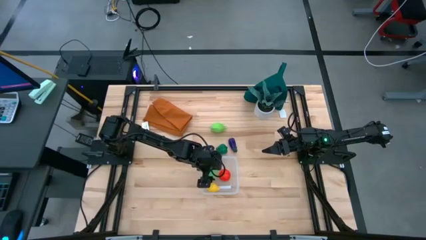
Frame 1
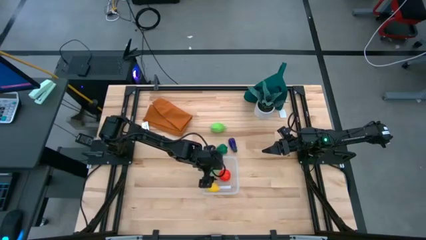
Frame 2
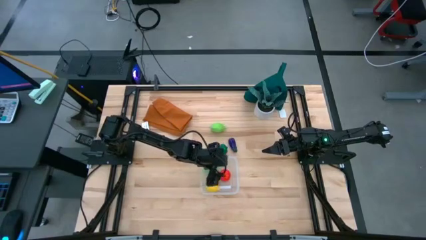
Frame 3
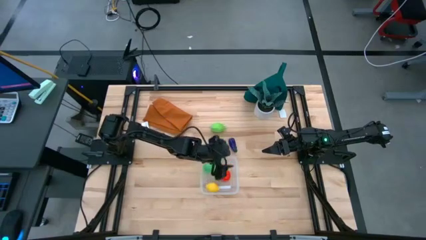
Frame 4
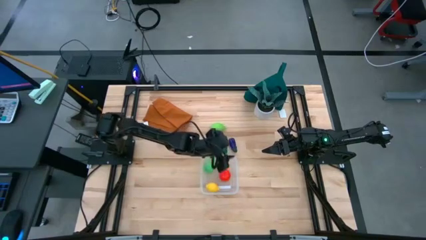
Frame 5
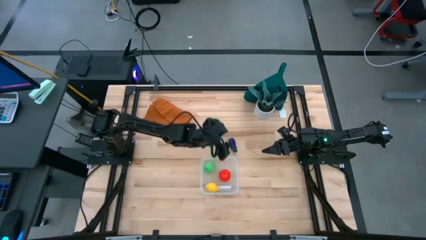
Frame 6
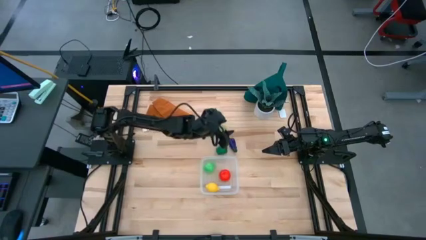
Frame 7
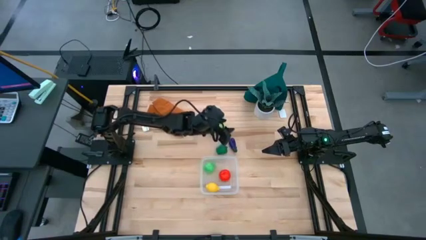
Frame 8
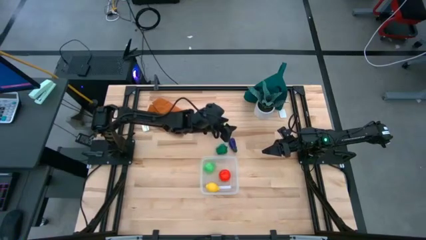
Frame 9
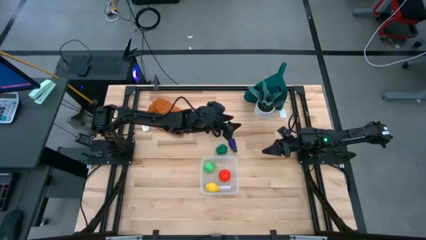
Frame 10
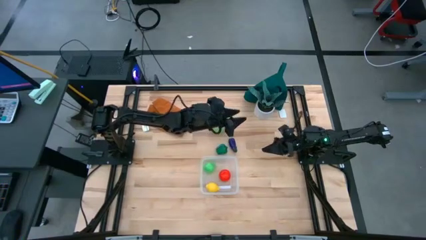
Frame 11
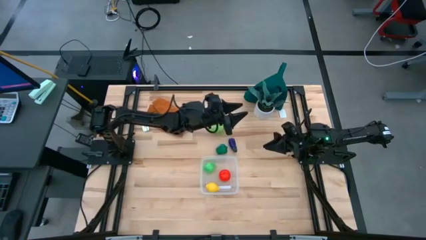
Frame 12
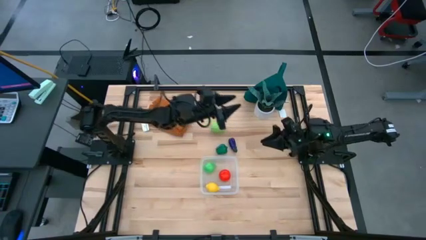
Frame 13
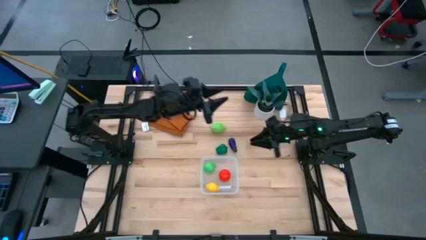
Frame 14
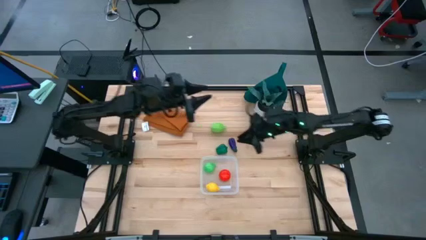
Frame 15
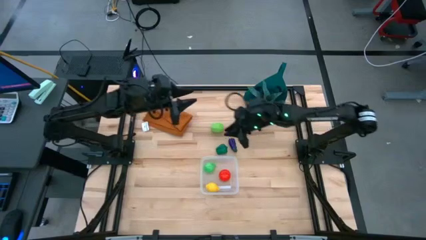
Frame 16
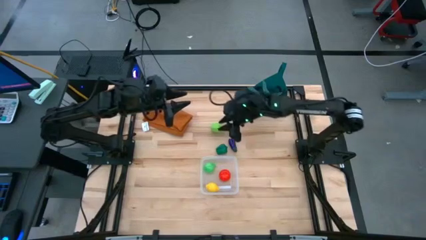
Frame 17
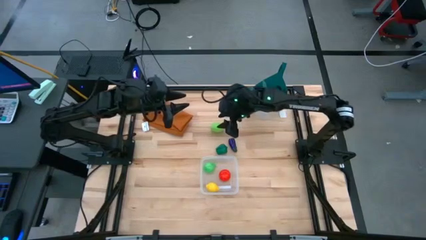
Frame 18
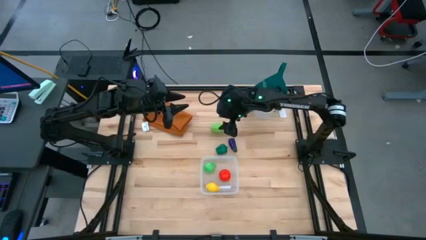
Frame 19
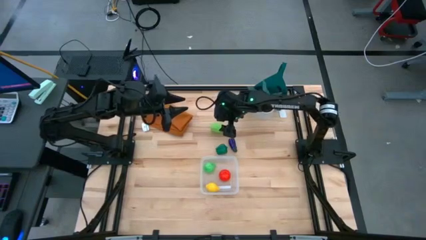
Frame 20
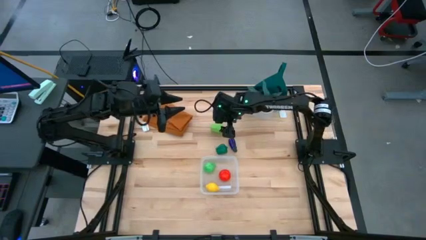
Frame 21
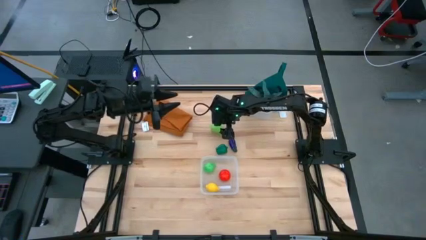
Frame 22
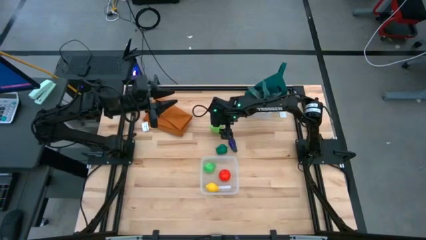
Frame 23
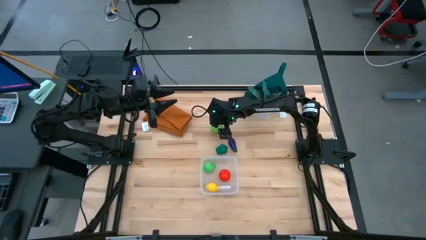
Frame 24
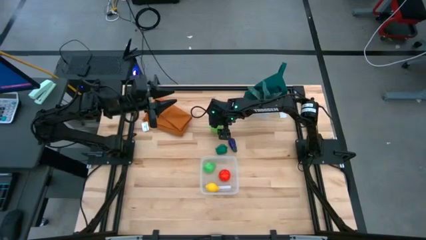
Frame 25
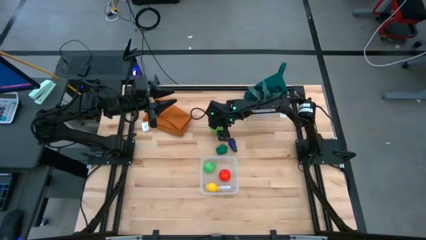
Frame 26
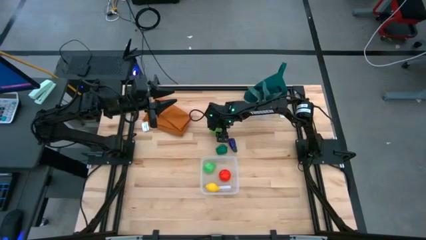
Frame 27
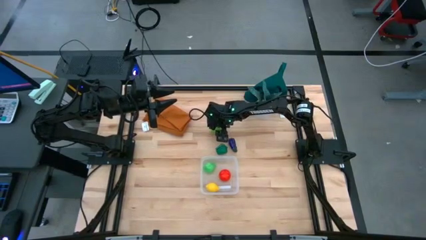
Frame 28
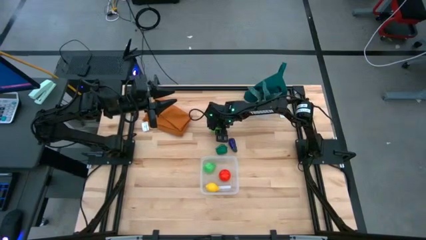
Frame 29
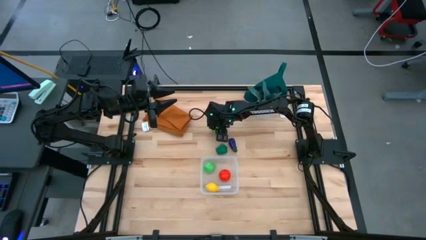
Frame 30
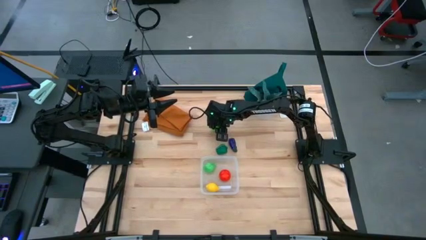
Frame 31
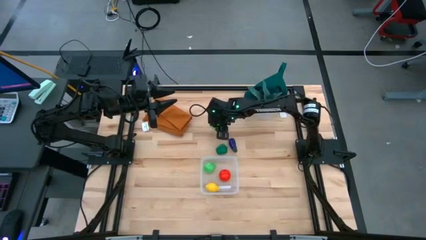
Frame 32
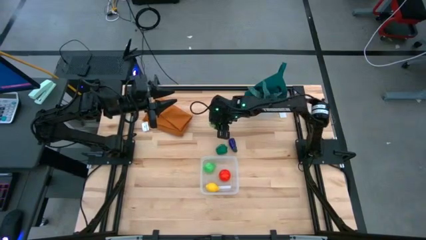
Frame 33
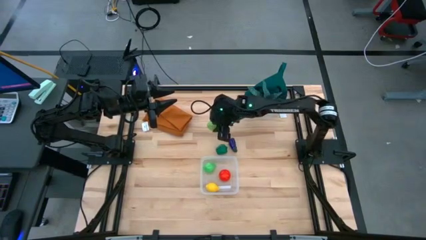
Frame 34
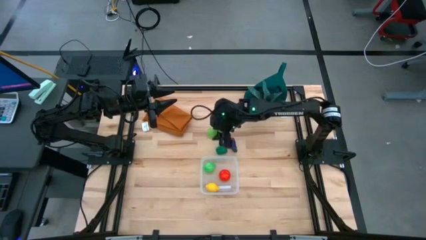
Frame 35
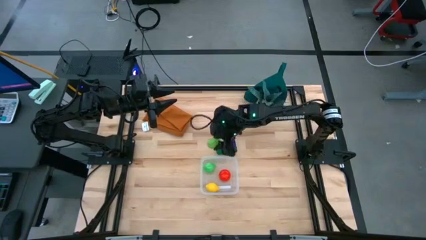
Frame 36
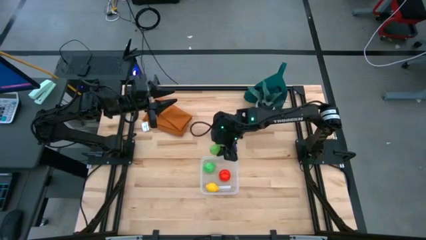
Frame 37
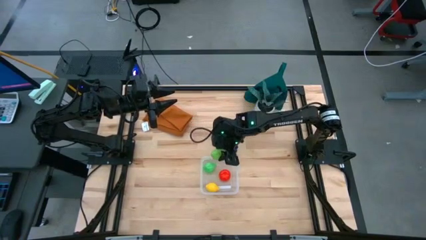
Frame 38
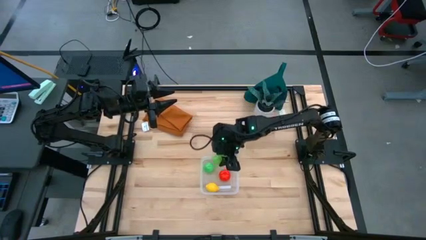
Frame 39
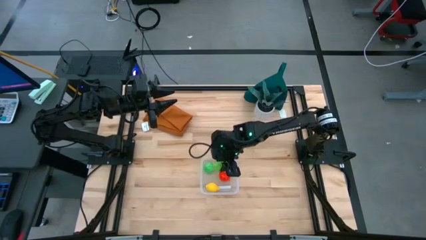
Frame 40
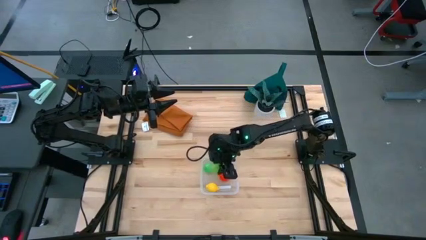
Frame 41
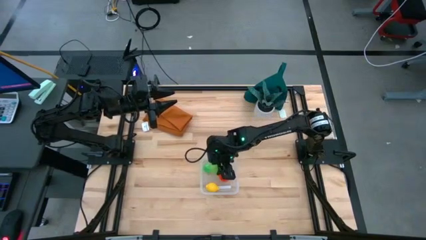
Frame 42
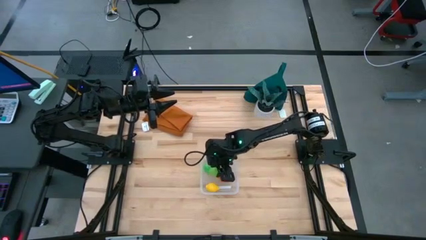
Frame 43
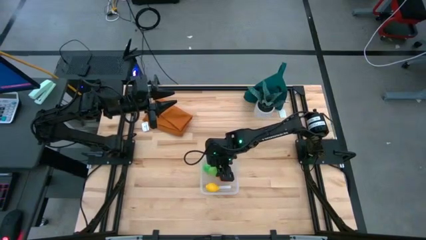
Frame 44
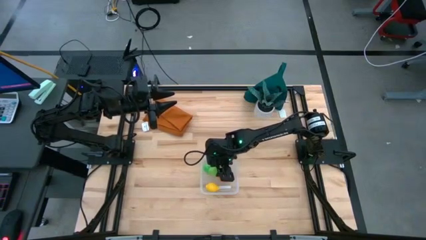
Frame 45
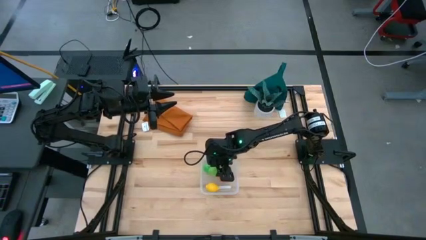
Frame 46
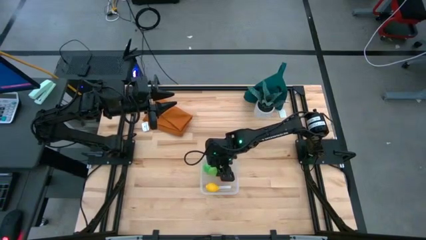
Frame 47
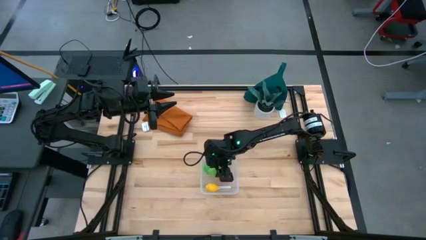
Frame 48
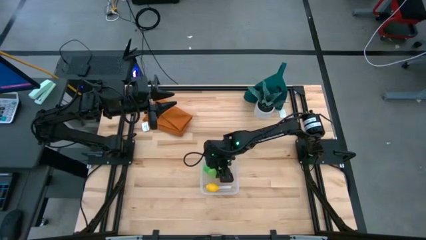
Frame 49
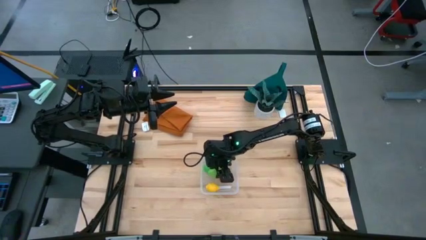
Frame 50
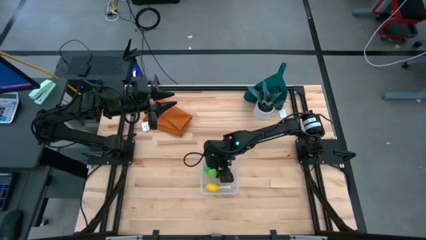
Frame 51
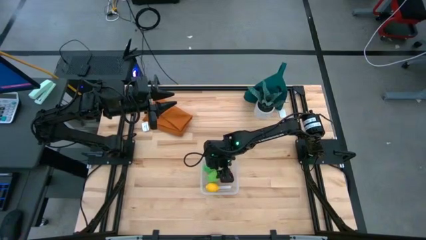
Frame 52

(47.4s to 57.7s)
Task: Pick and placing Produce into tupperware
Put the melon into the transparent bin

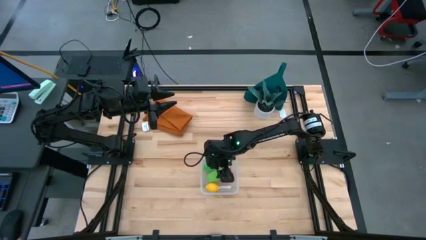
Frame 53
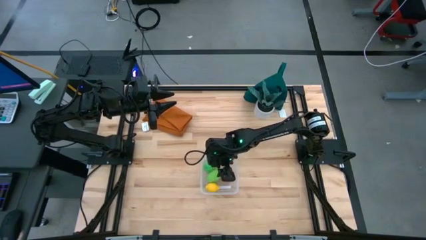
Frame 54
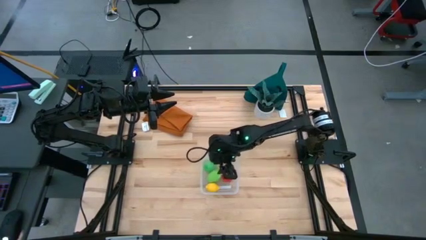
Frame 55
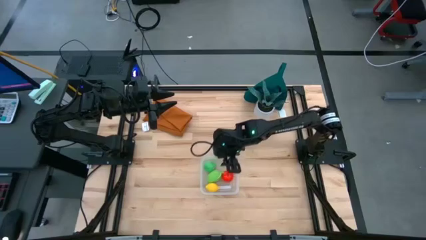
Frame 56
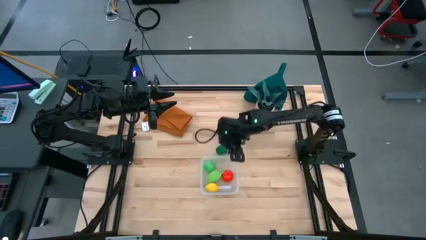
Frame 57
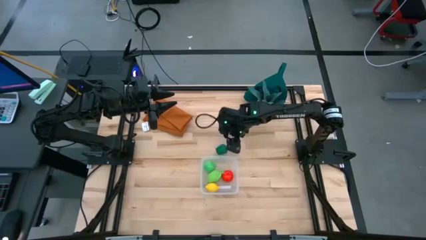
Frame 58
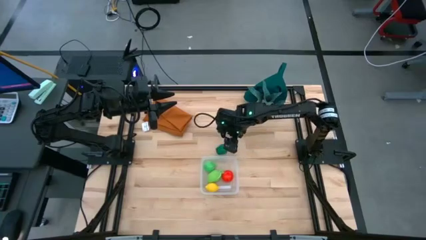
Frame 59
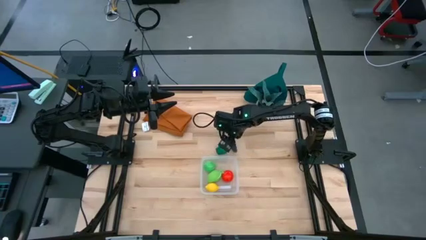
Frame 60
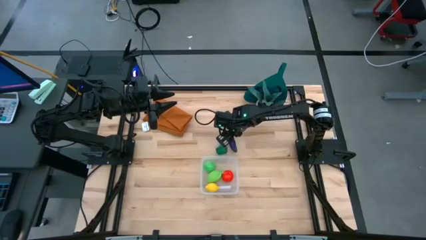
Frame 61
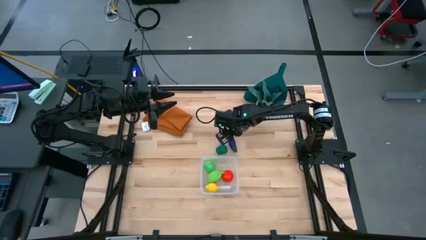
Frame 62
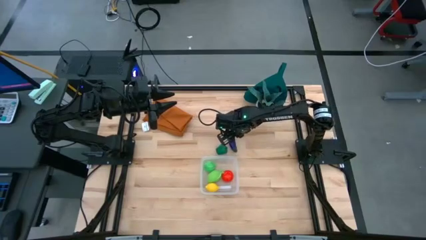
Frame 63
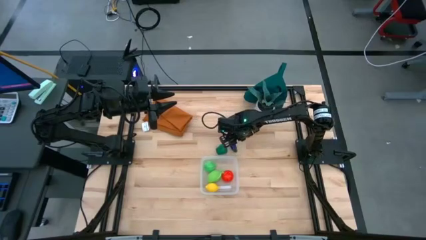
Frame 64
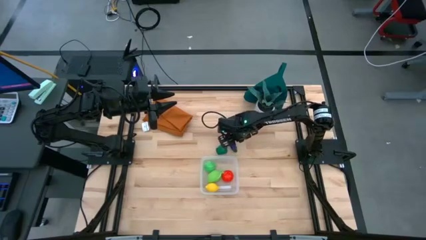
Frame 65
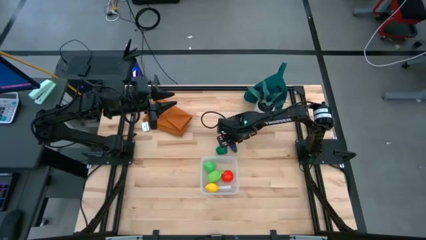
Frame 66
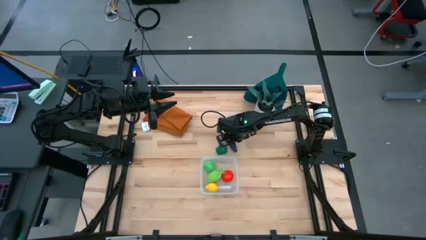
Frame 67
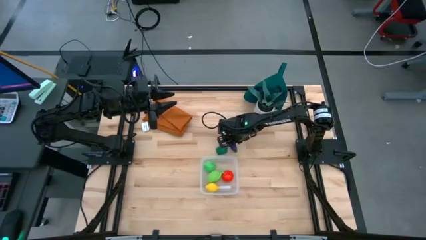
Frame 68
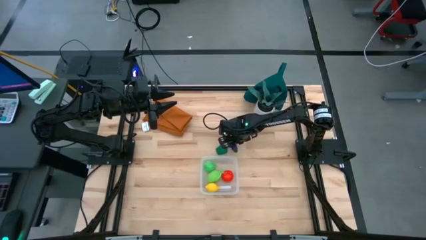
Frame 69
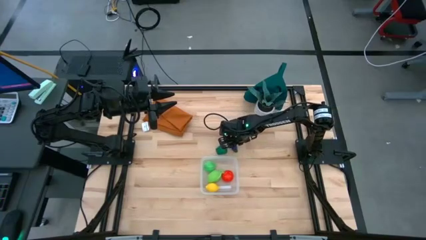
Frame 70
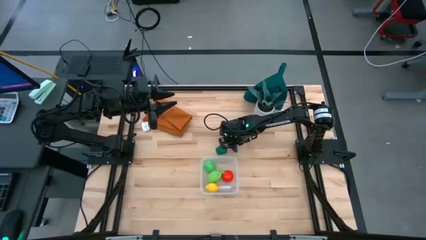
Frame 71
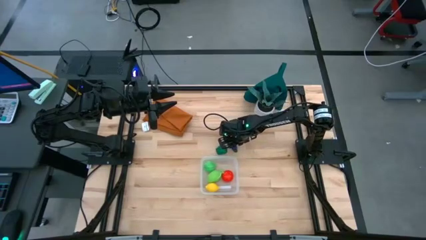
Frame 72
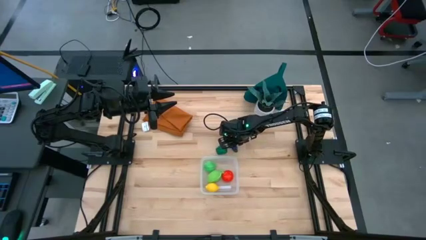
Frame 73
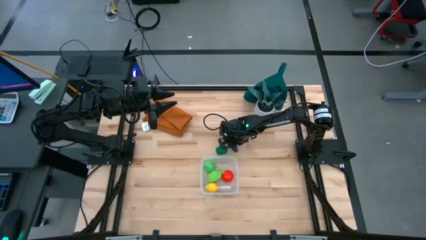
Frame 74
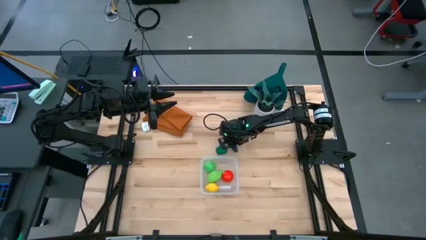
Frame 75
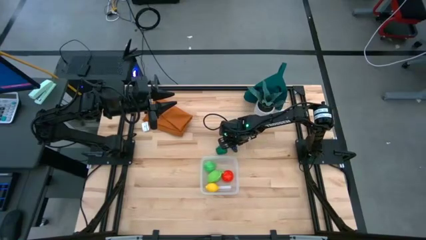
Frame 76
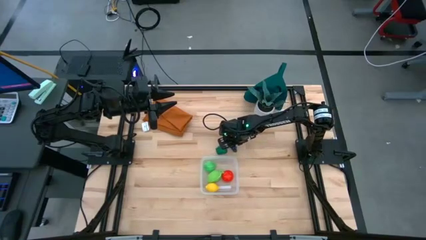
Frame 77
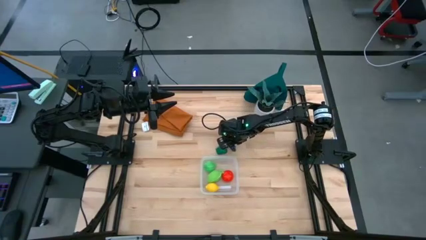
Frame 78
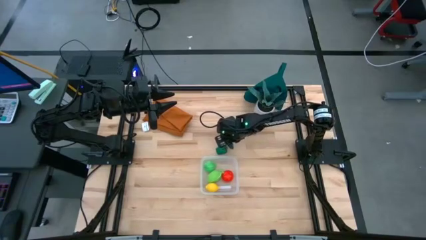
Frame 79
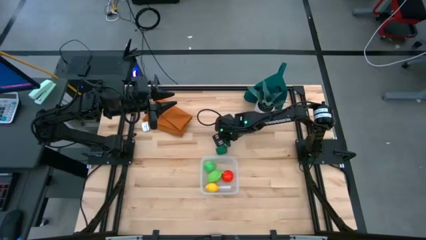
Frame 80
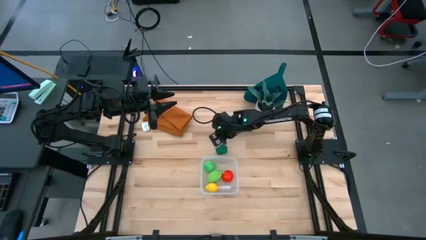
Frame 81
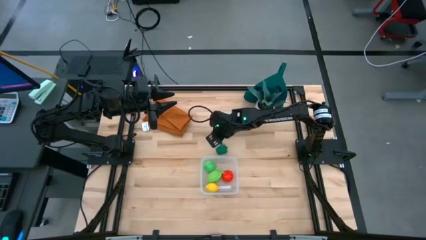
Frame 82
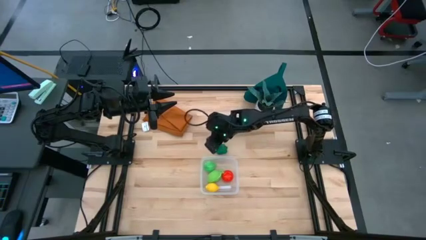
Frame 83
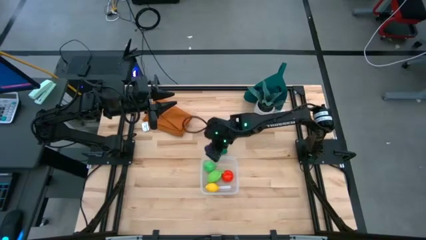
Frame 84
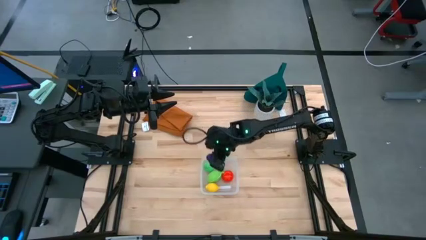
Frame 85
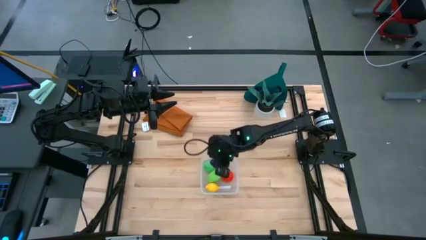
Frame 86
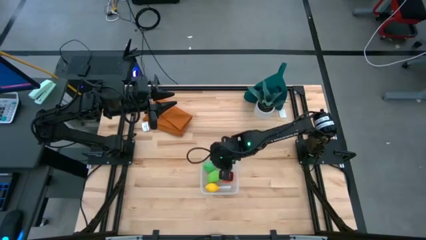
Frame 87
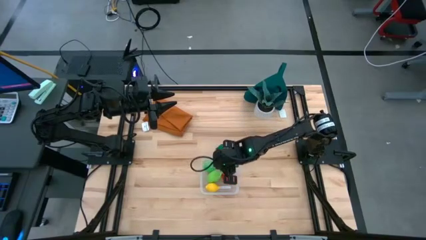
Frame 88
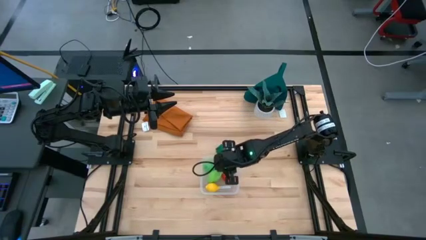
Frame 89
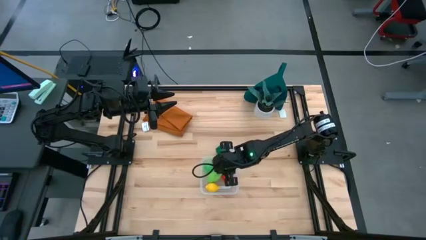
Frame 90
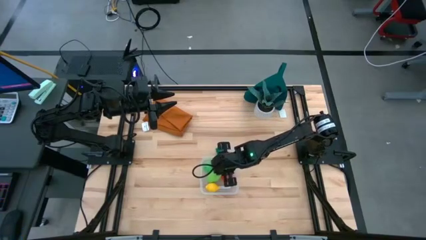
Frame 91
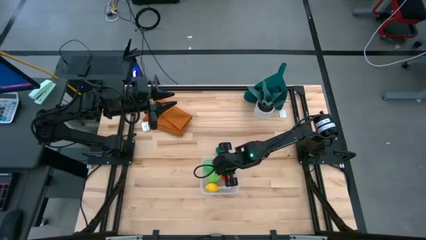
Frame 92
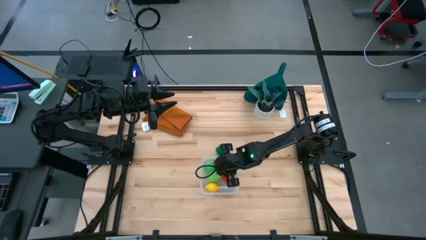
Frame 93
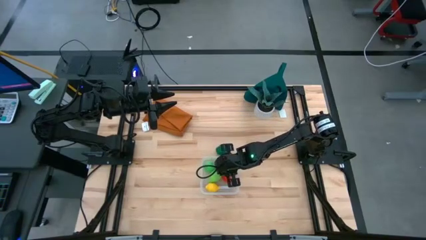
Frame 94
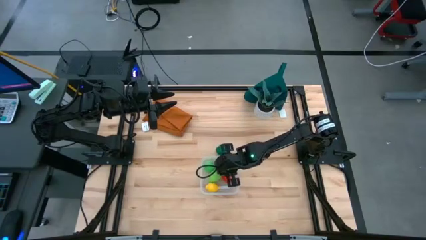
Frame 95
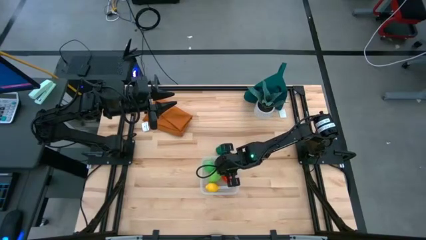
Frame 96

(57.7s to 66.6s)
Put the eggplant into the transparent bin
